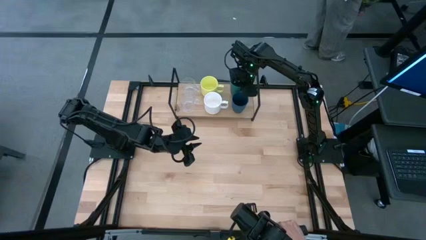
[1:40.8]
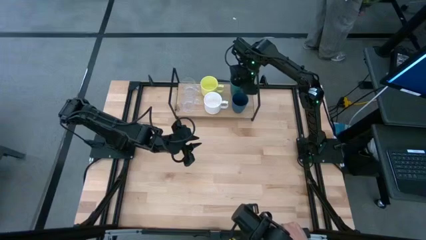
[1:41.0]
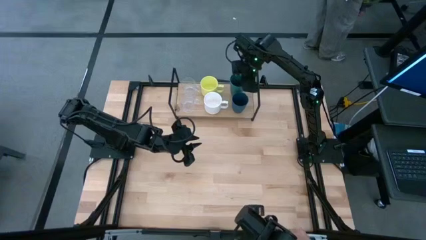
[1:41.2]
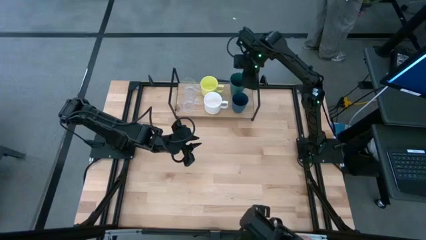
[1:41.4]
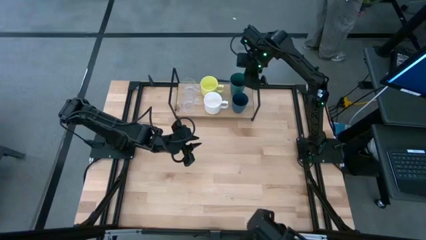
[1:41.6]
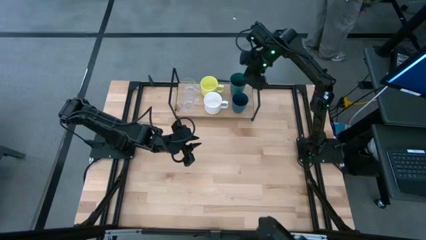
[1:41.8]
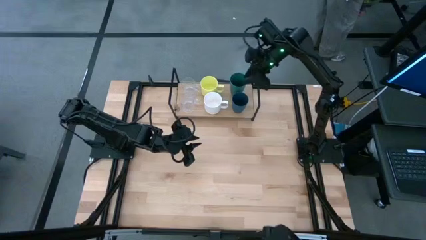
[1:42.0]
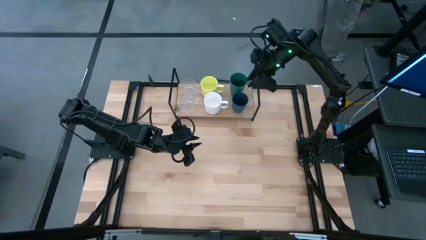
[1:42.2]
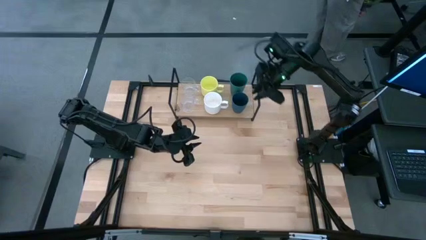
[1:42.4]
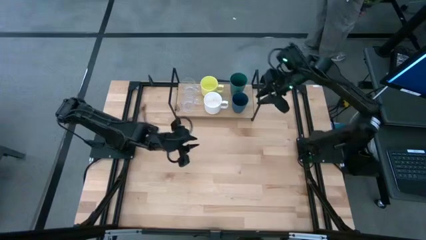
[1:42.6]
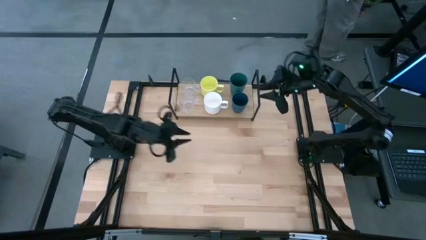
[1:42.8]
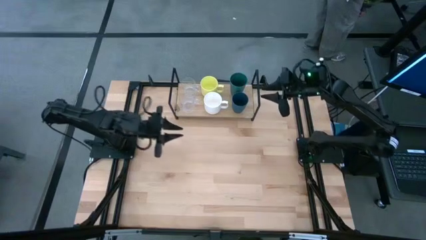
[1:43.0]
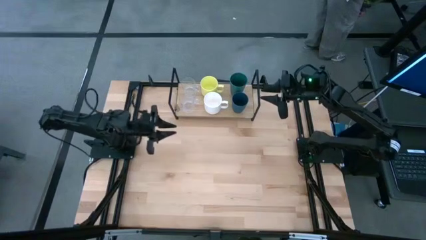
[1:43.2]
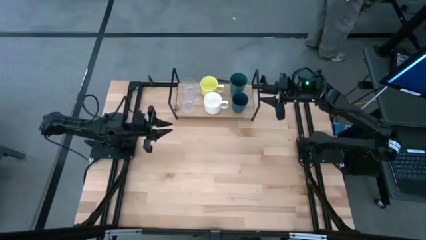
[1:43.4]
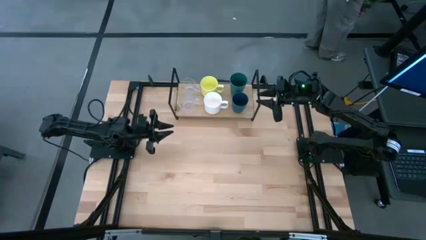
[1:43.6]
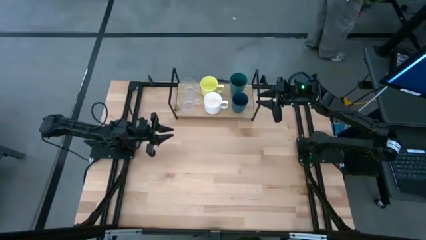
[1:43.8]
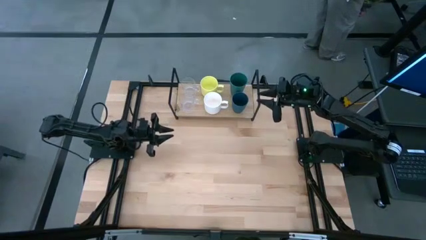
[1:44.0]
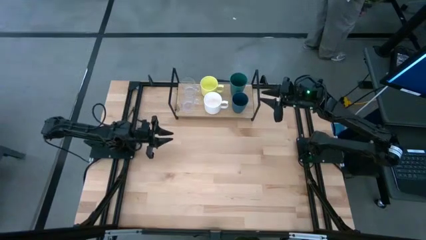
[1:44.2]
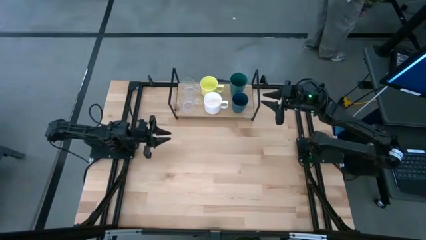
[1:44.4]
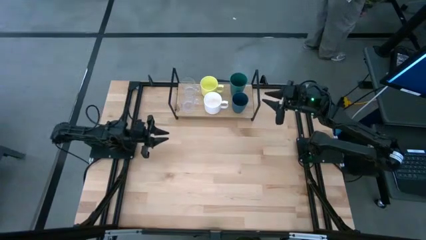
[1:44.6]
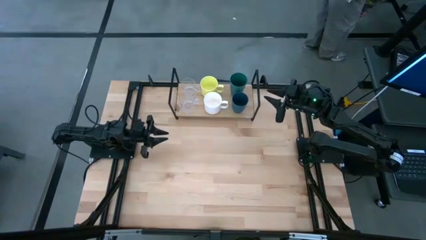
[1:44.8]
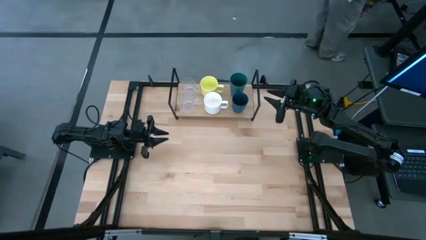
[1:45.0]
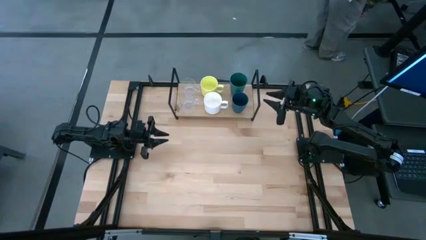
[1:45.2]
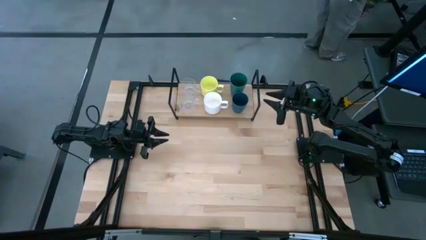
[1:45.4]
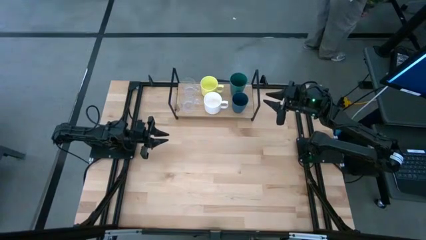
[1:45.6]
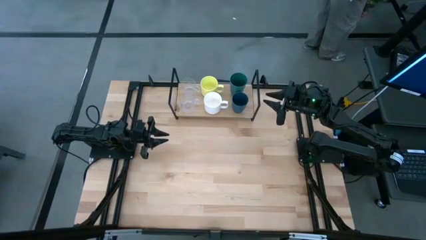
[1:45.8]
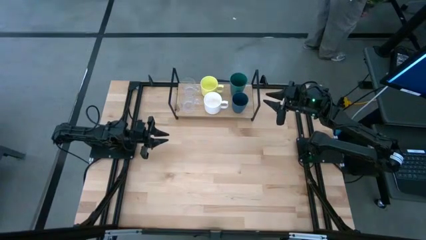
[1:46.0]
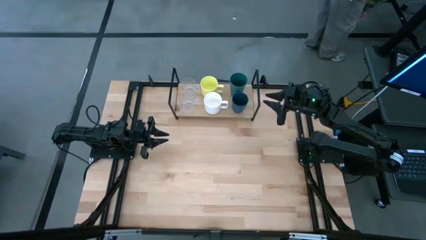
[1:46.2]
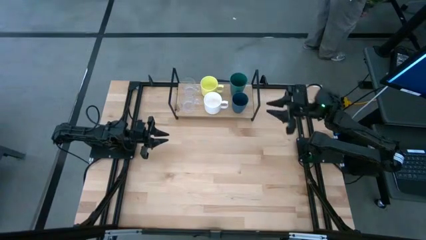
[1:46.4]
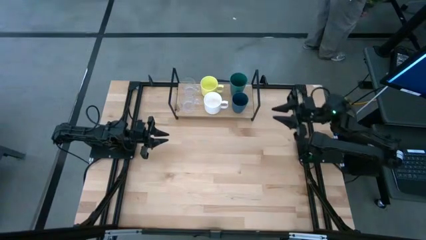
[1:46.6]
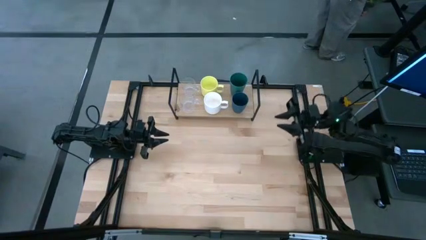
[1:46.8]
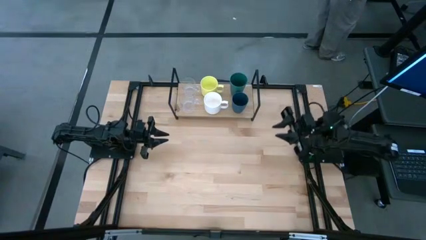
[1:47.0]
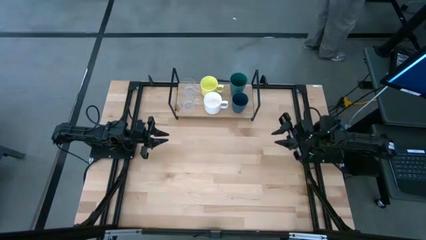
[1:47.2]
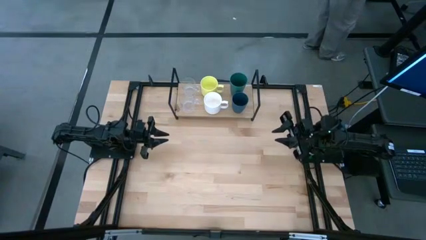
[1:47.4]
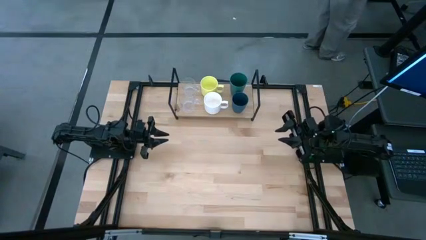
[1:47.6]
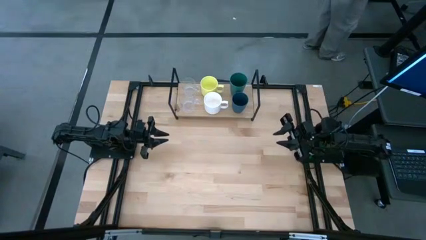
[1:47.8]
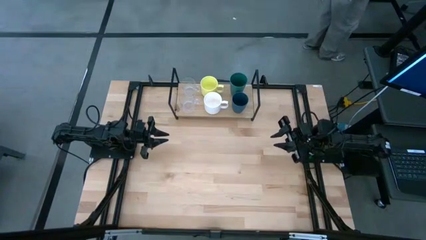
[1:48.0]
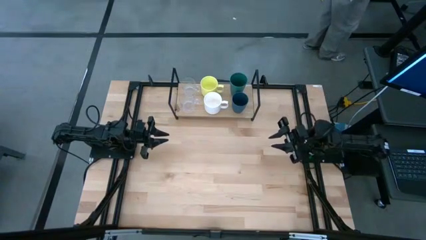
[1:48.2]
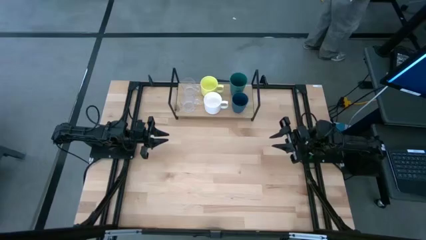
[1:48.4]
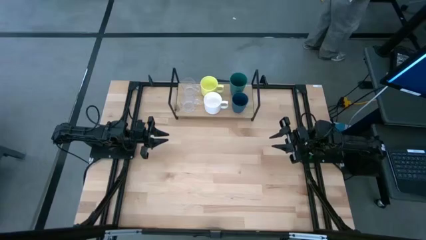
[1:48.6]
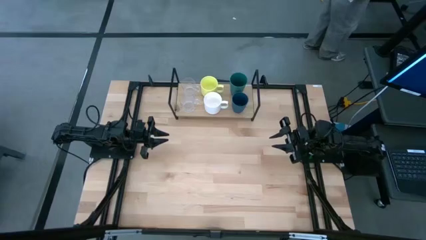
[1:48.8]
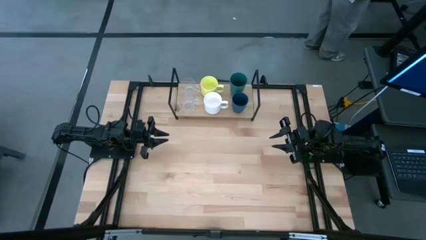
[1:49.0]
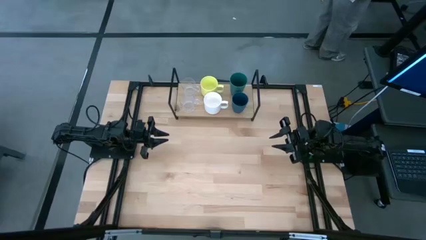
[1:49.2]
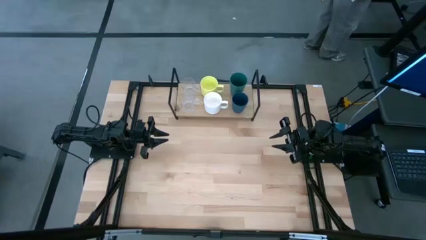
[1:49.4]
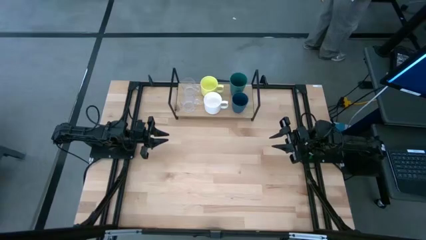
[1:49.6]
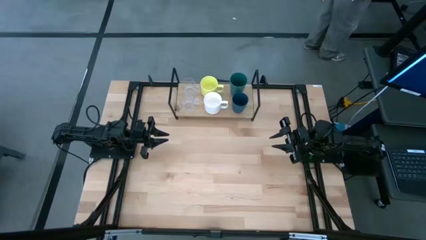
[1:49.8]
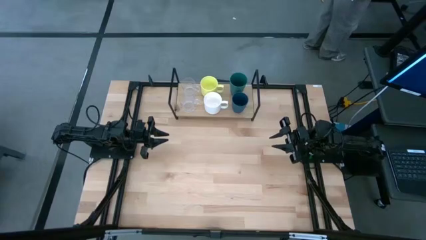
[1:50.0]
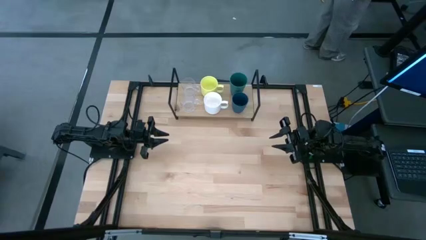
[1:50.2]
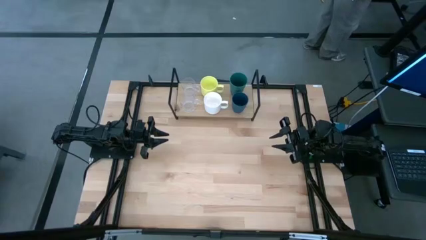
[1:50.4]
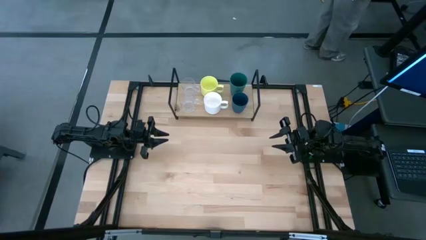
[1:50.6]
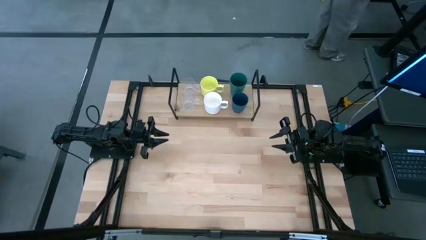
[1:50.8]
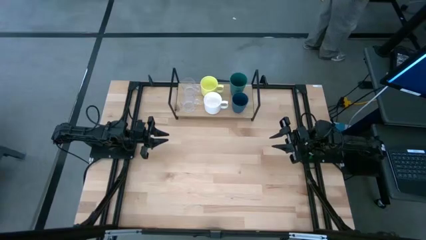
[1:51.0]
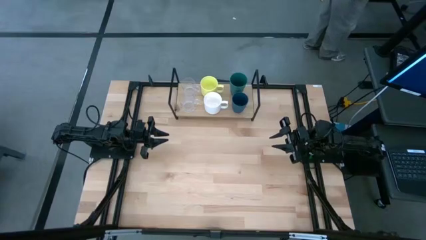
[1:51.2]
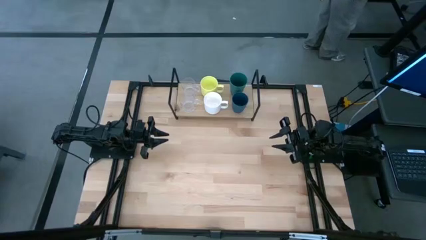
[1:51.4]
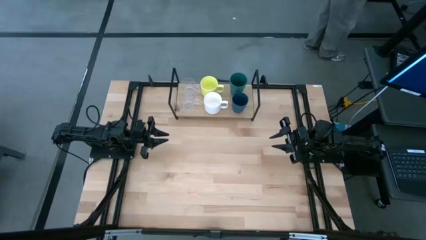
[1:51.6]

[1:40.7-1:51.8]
Task: Stack small to large cups/mugs on shelf
Return to Home Position

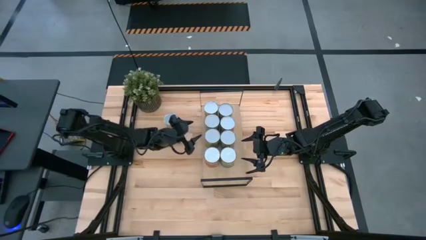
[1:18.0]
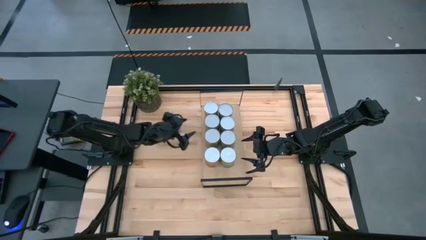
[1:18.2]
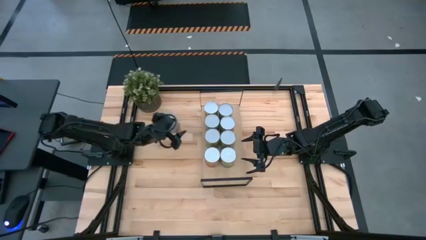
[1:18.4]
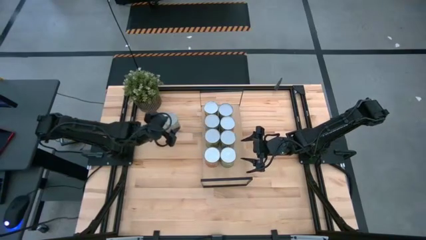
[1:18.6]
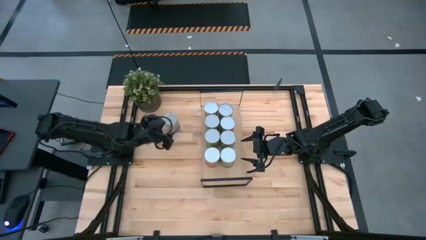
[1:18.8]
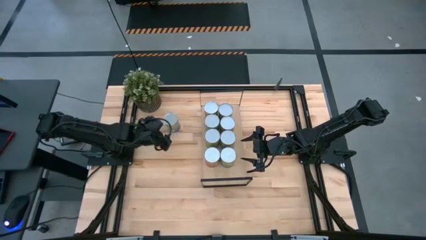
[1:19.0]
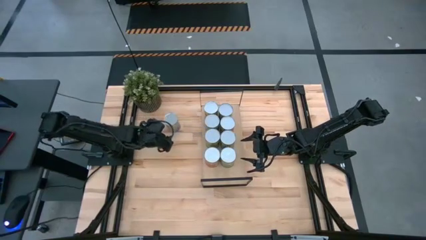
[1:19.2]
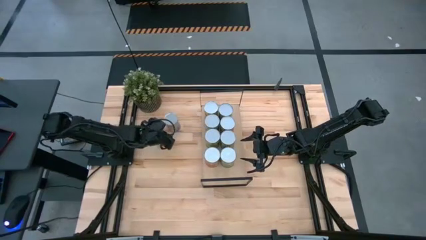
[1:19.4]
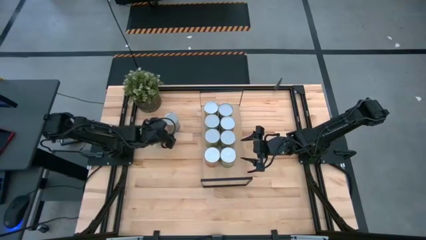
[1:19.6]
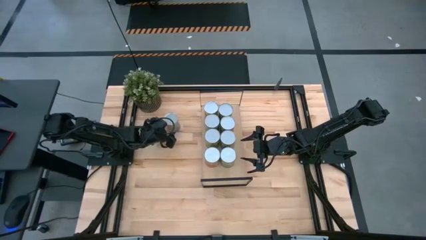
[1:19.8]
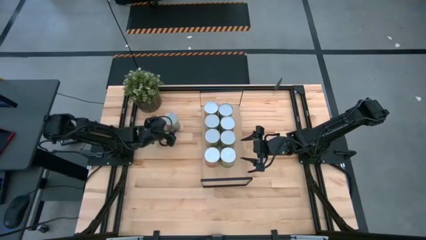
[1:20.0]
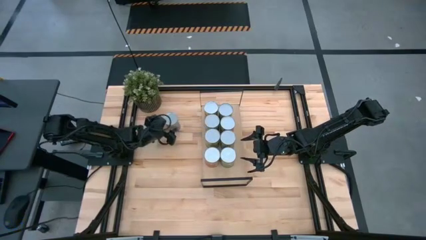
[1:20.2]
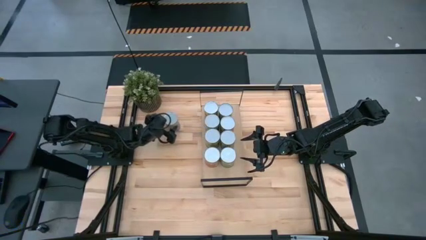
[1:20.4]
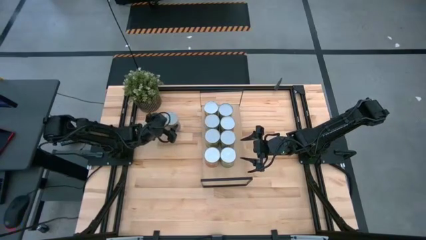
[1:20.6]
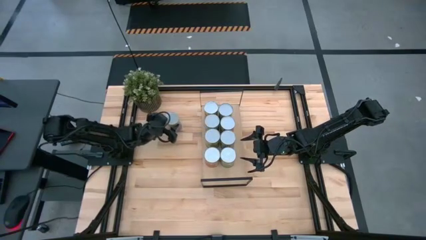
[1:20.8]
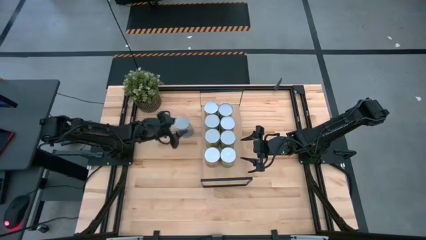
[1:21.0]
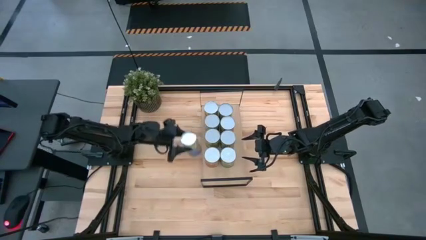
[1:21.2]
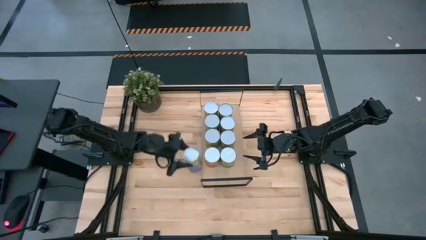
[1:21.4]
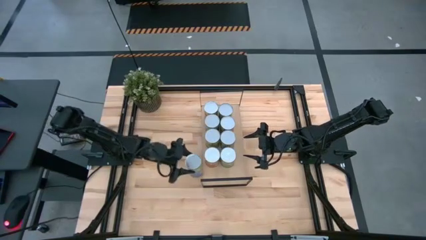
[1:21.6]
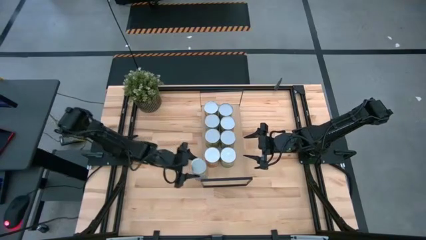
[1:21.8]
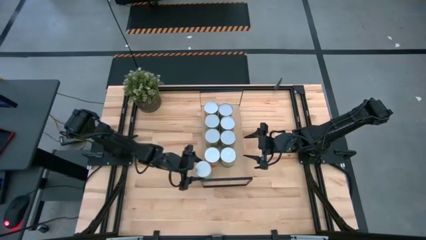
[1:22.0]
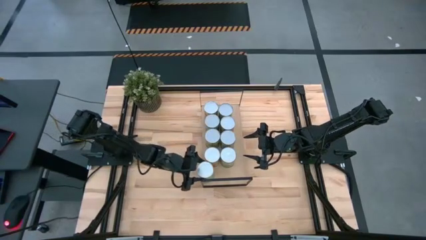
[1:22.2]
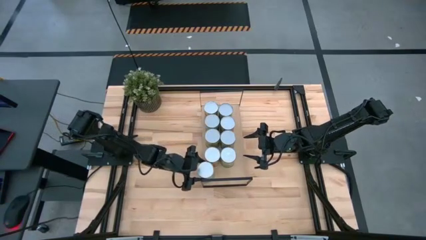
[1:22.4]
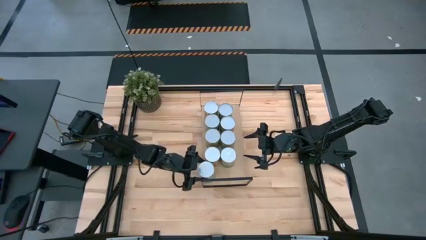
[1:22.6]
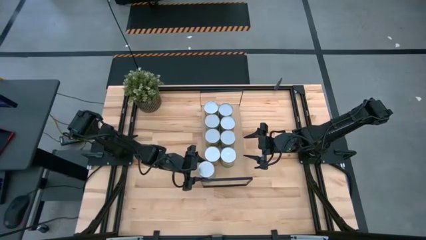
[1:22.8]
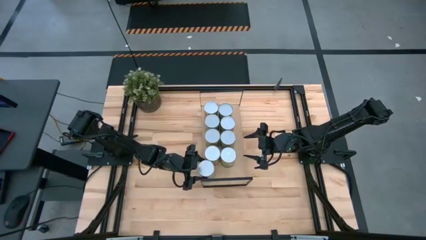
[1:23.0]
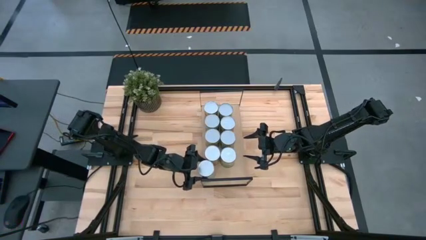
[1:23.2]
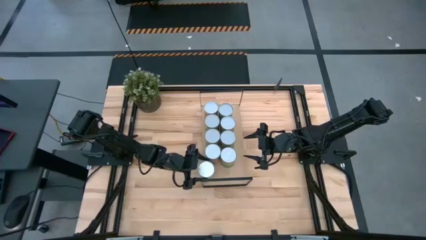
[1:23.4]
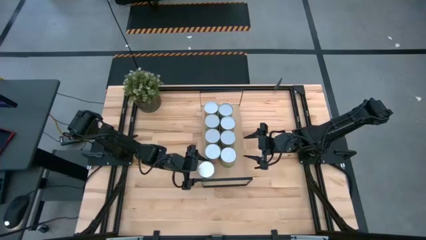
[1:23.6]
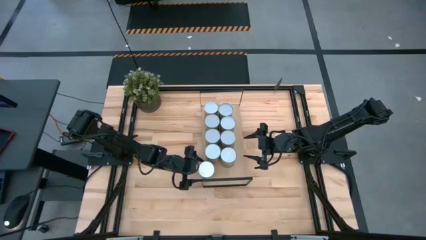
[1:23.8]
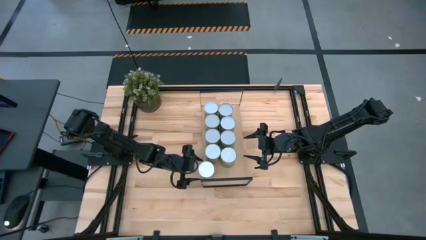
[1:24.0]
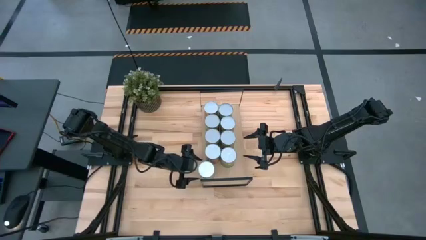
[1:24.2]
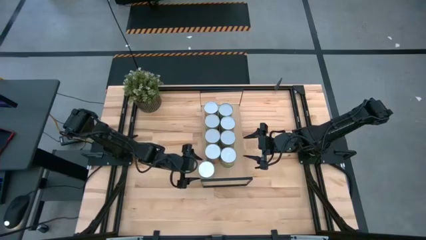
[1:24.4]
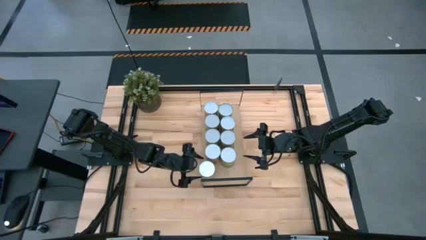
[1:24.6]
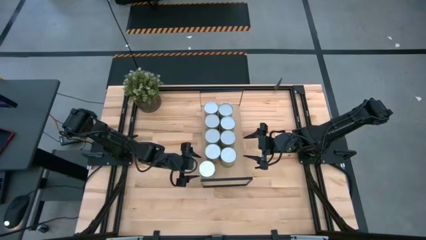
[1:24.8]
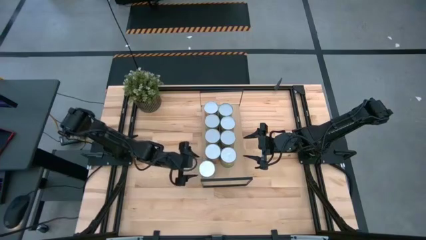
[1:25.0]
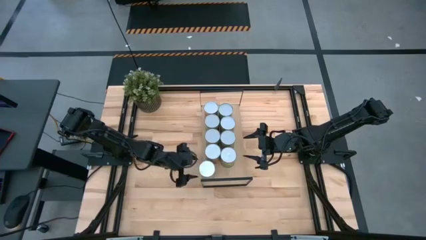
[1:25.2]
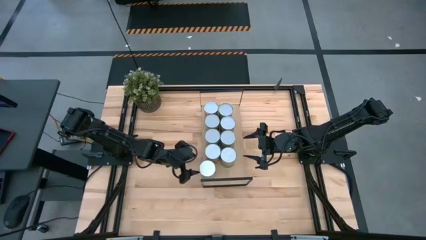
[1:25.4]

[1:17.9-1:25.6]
Task: Pick and place cans onto a shelf
Put the canned peaches on the shelf
